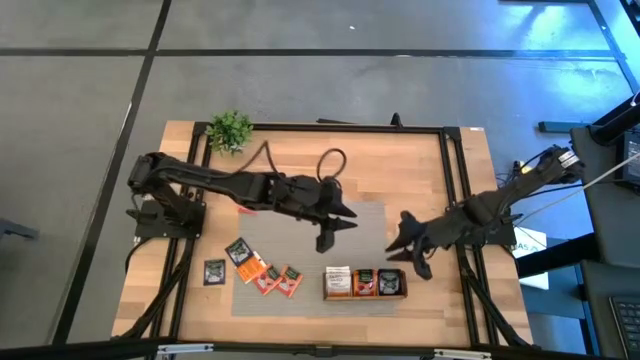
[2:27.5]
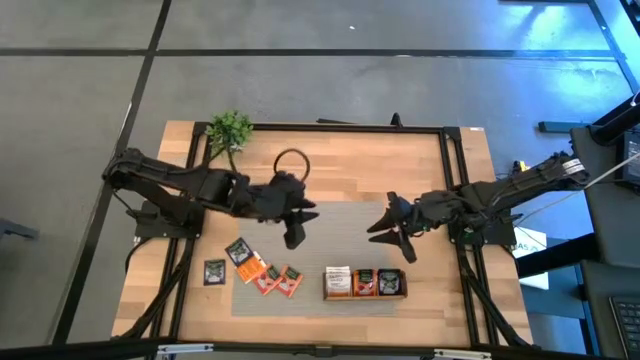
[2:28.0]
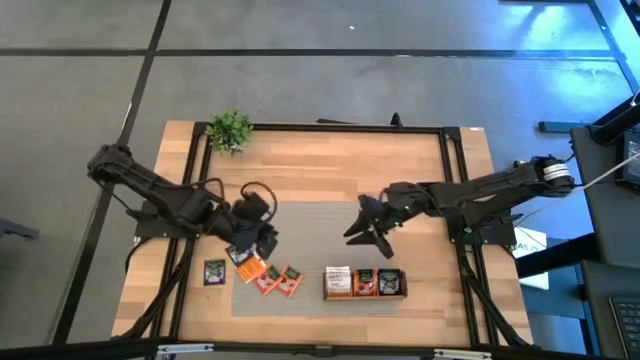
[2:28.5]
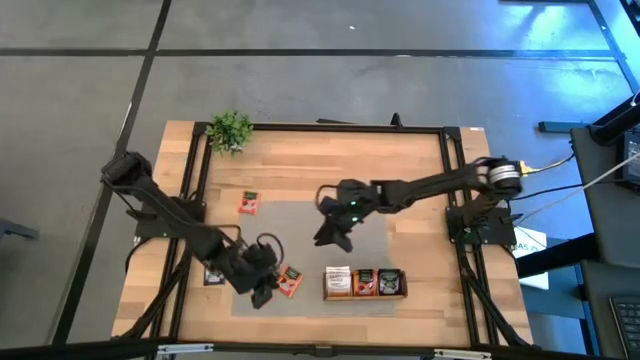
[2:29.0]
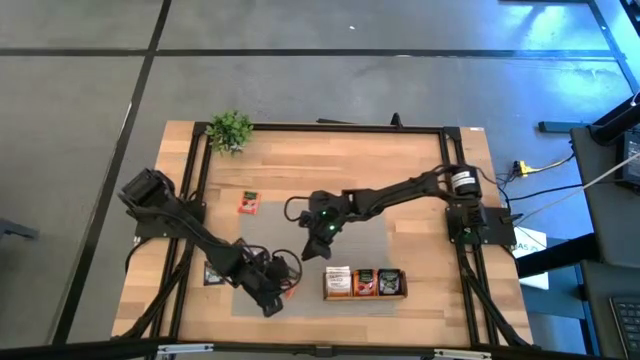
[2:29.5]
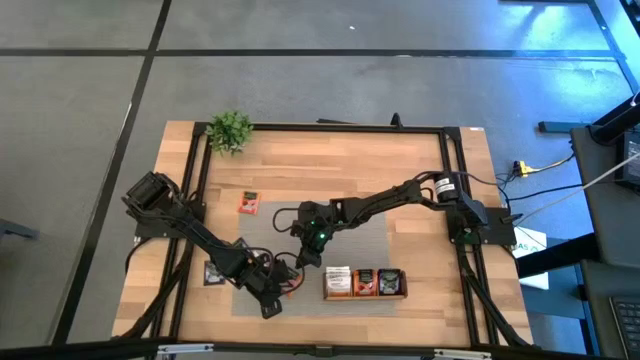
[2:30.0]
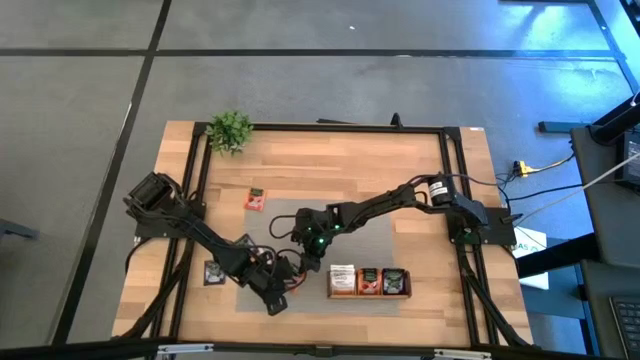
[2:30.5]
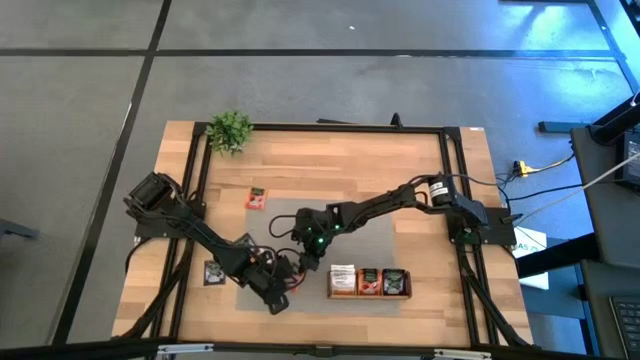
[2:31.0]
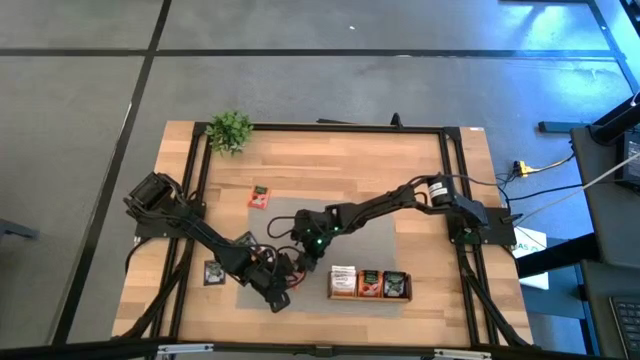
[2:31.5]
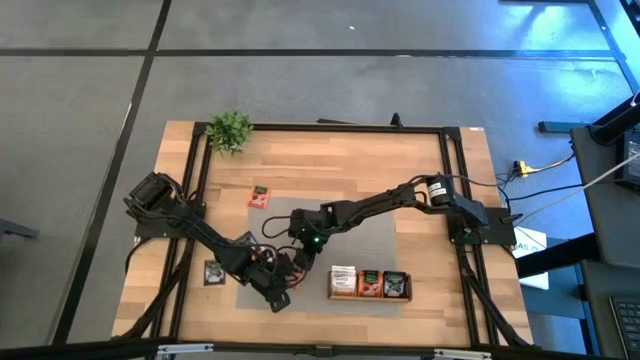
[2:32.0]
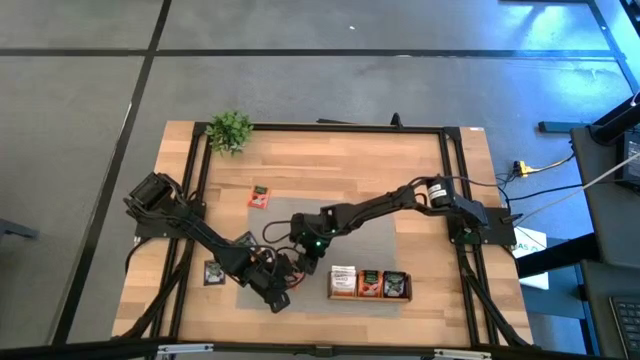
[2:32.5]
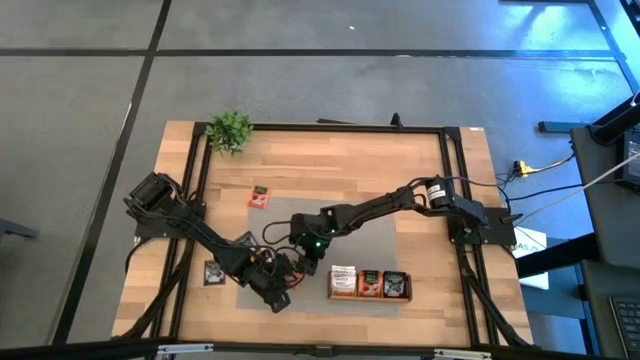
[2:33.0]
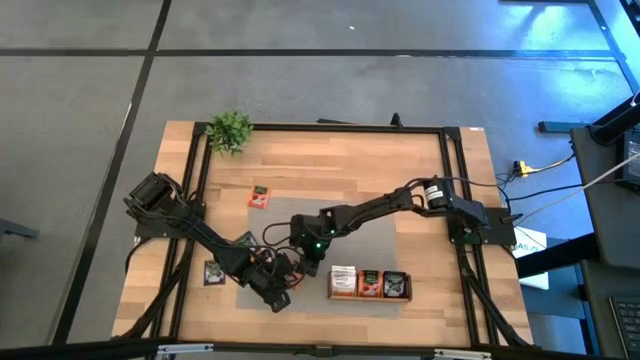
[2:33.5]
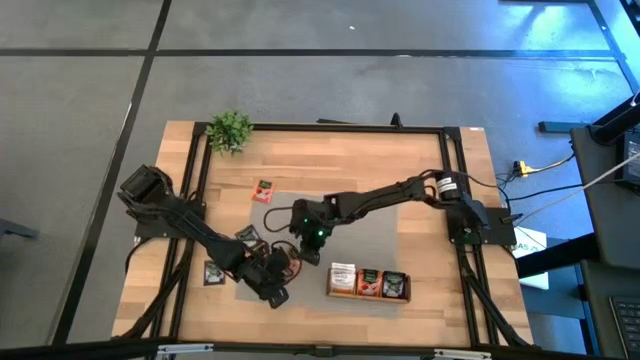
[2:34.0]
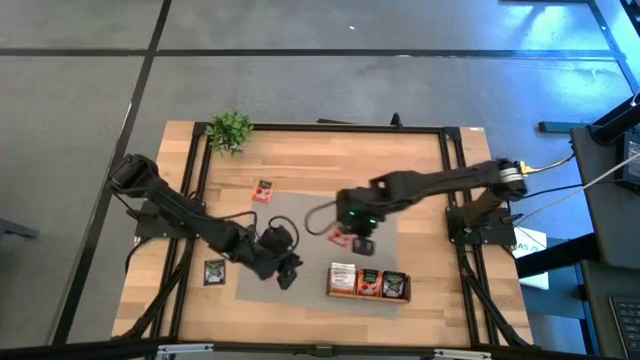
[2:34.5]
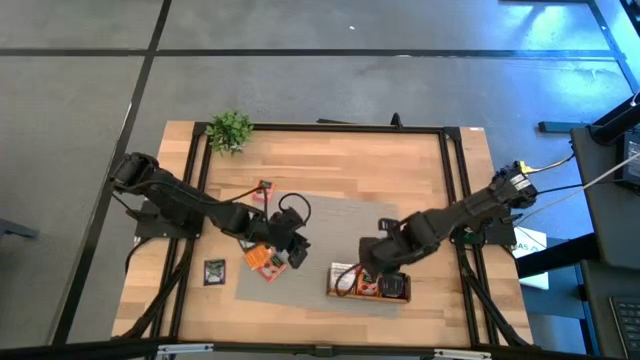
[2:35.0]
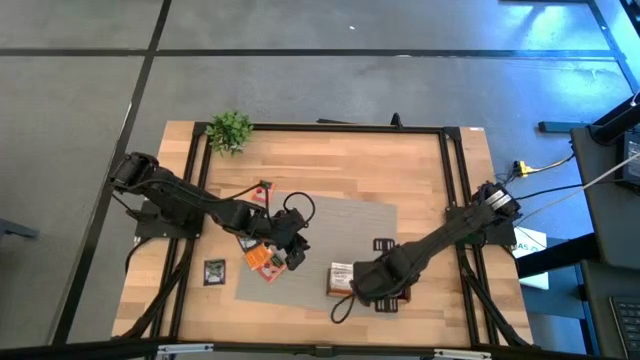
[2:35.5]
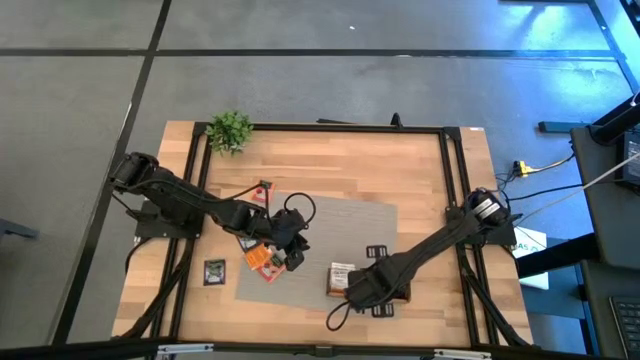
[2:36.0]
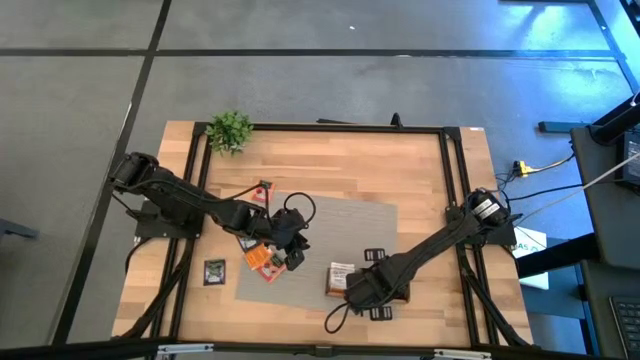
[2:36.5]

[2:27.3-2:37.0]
Task: Pick & Place Tea
Put the bottom right yellow tea bag into the middle compartment of the wooden organizer

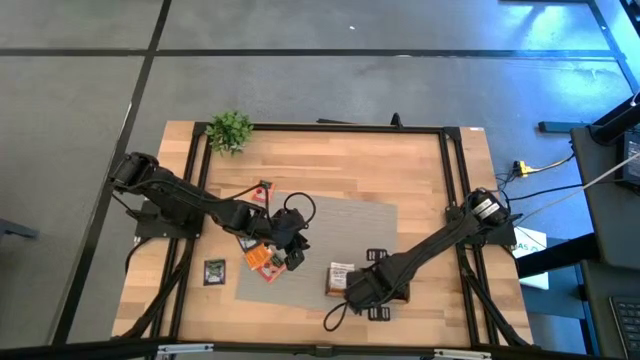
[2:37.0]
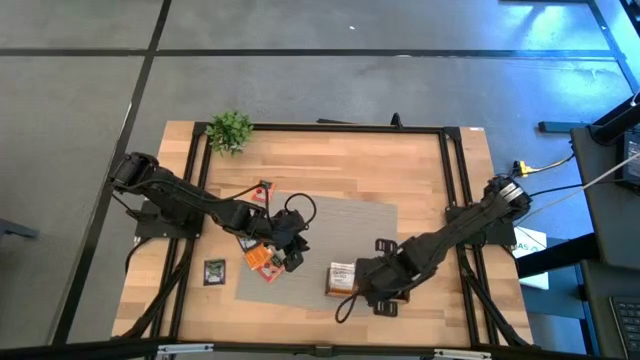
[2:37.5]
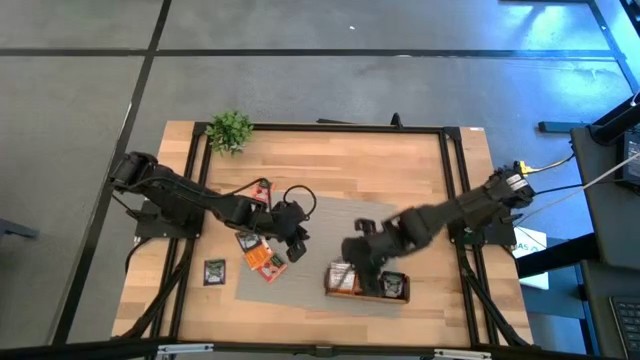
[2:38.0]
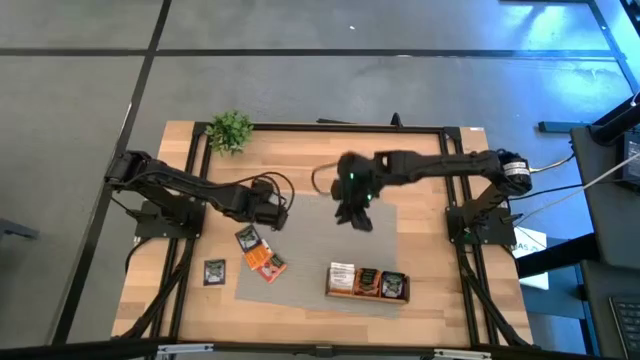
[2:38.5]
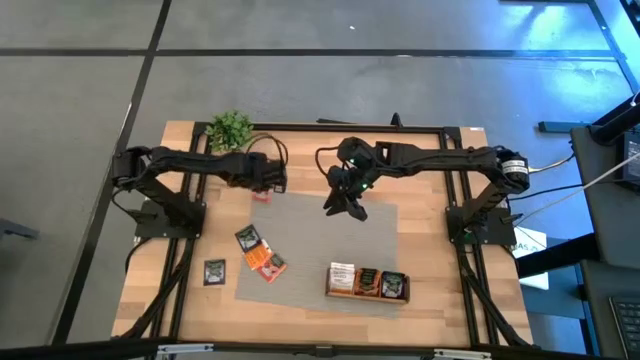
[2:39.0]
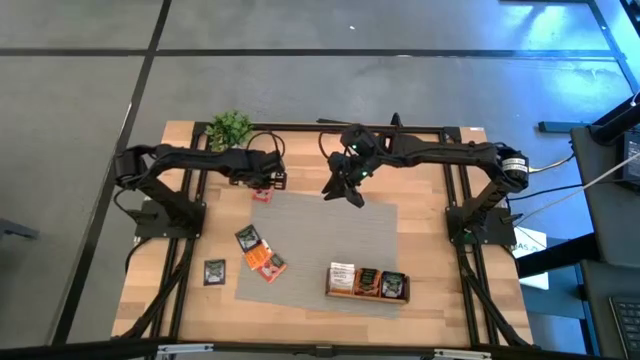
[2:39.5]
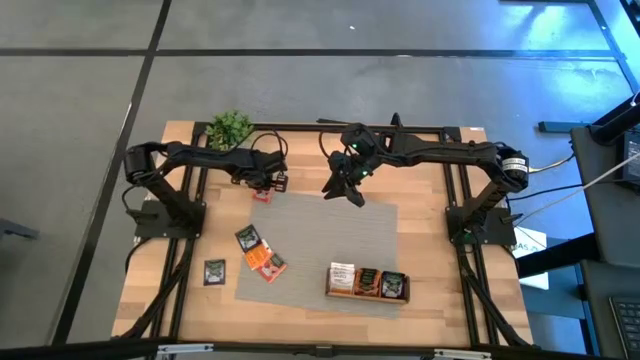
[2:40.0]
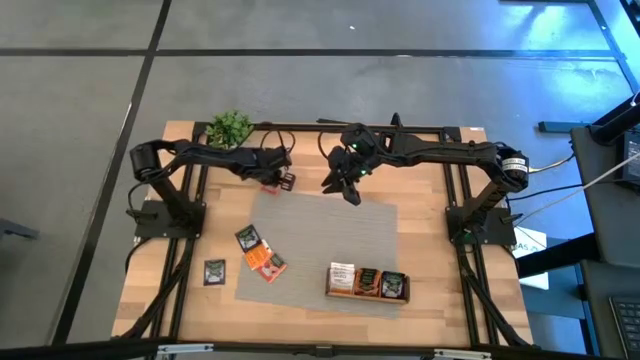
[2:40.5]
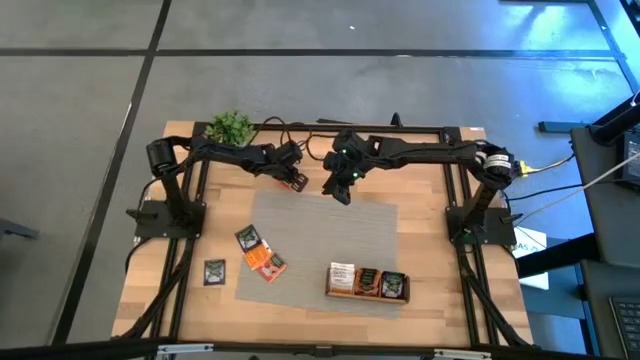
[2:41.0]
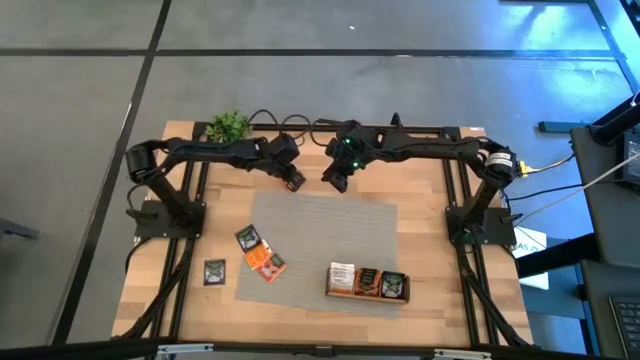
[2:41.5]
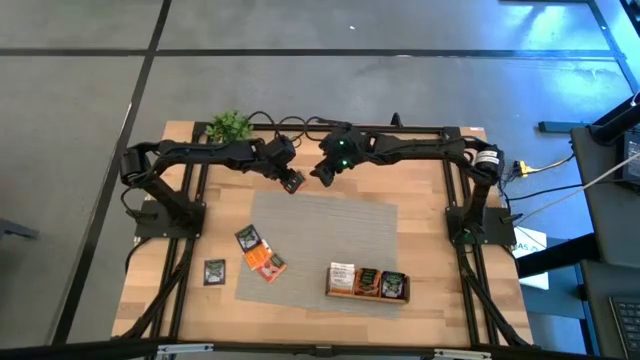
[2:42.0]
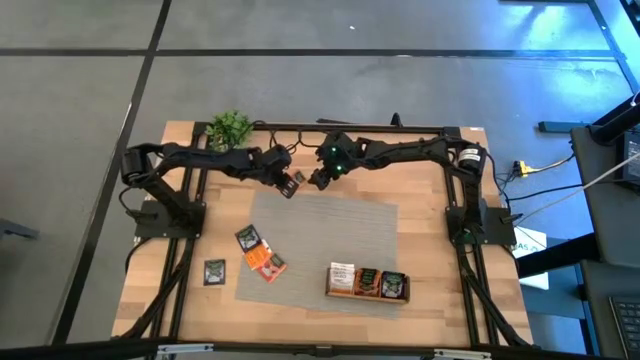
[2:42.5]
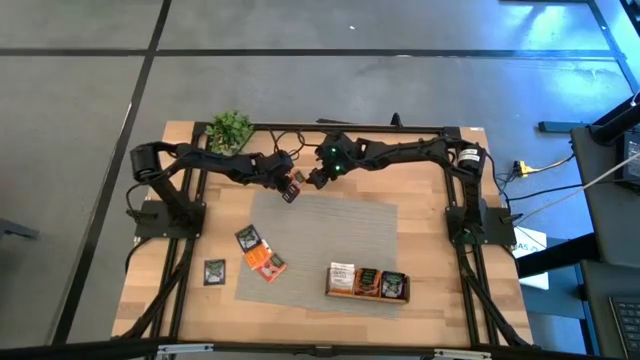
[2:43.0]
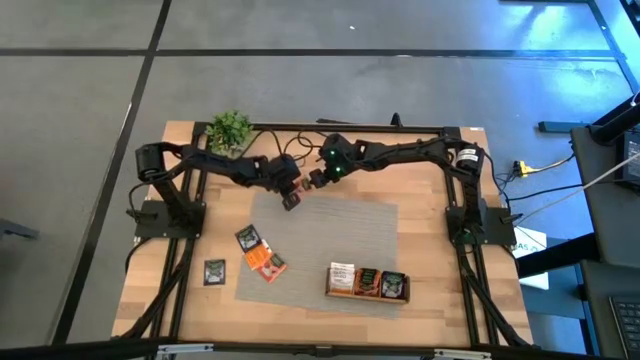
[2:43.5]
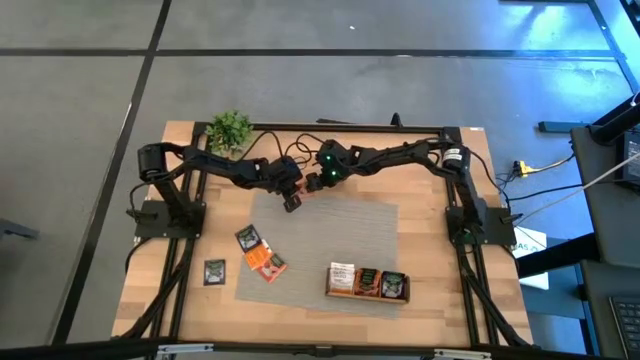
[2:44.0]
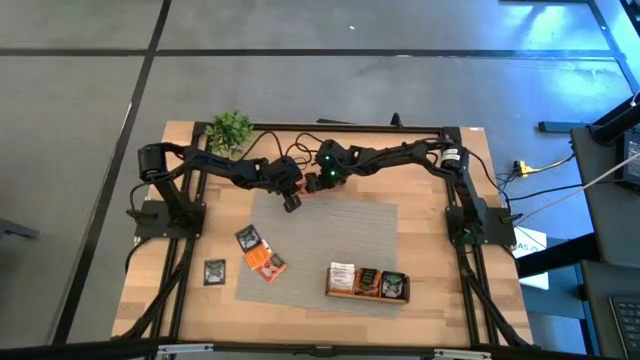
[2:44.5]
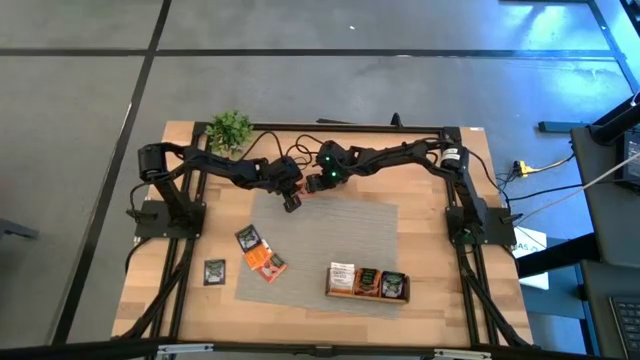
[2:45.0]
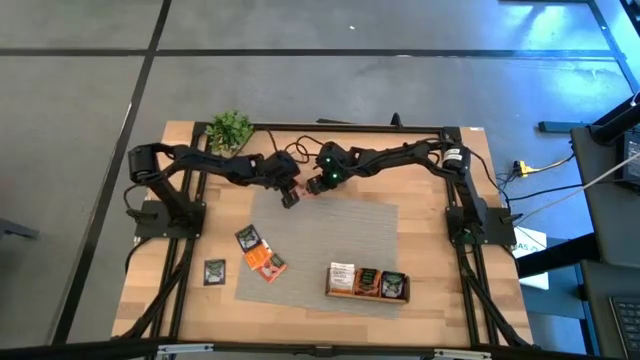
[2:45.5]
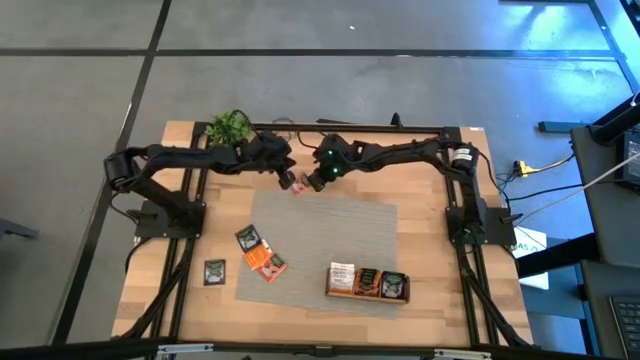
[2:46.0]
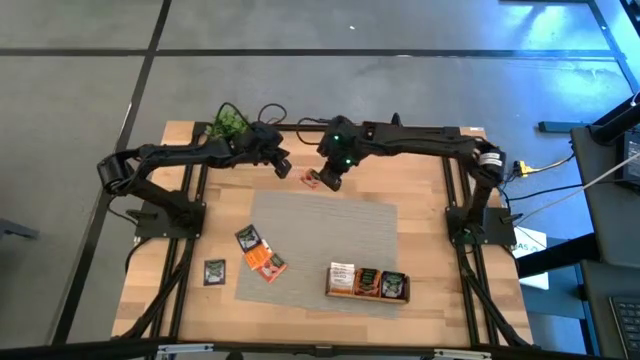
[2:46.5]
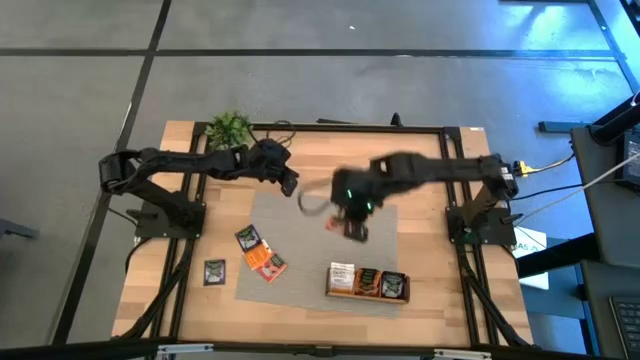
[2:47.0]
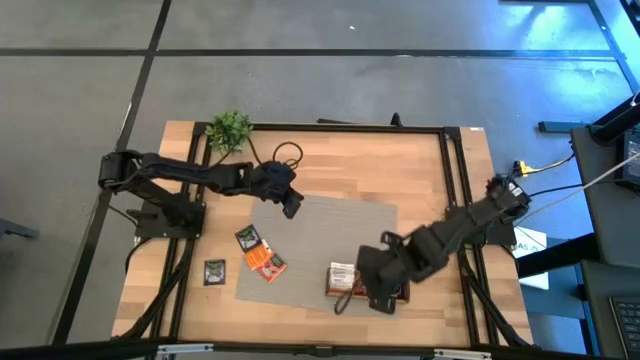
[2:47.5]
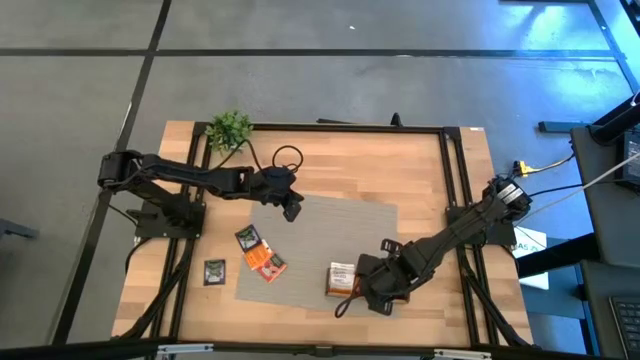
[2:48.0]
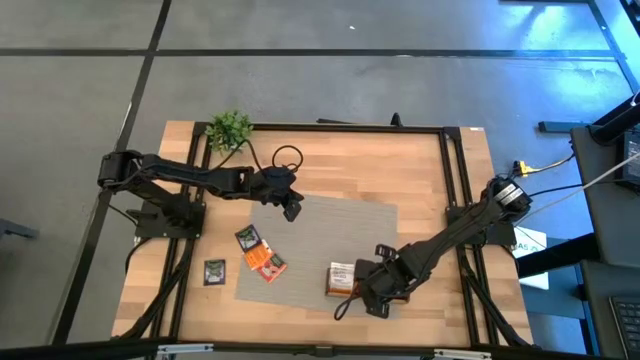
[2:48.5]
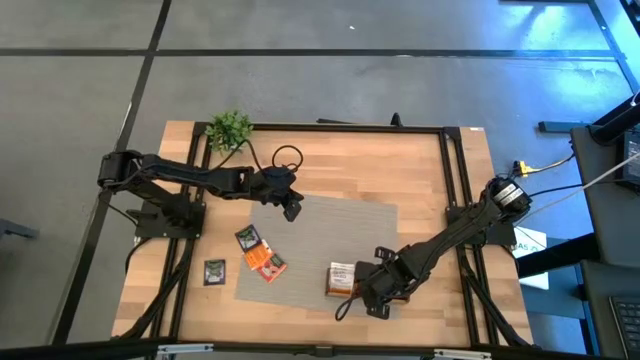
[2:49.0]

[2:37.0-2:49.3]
Put the top yellow tea bag into the middle compartment of the wooden organizer
